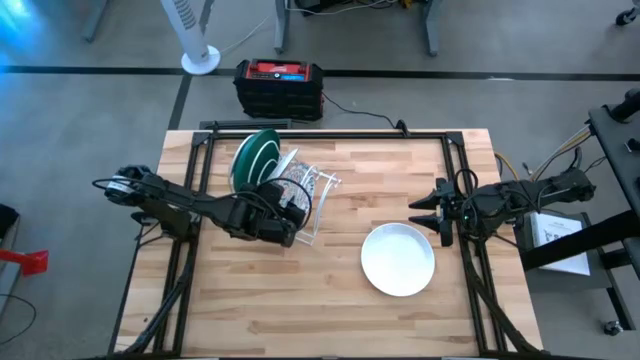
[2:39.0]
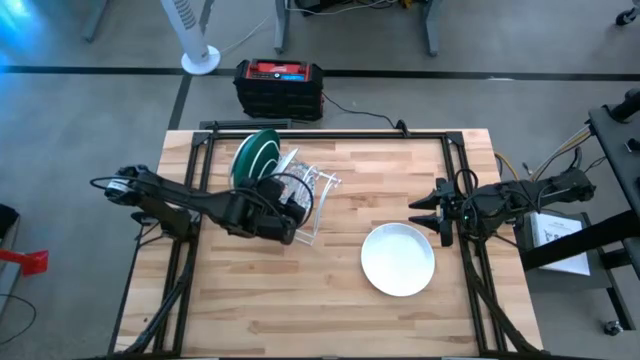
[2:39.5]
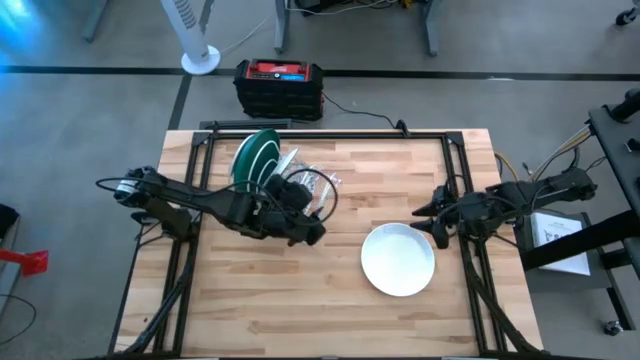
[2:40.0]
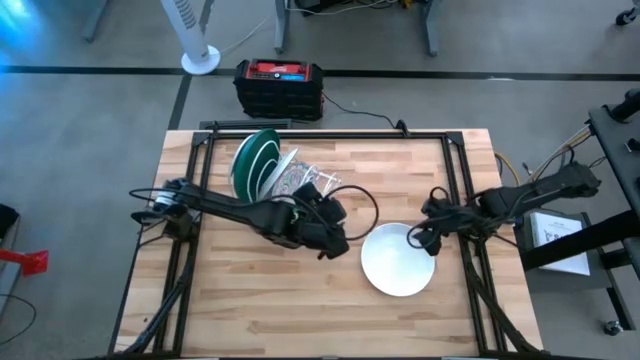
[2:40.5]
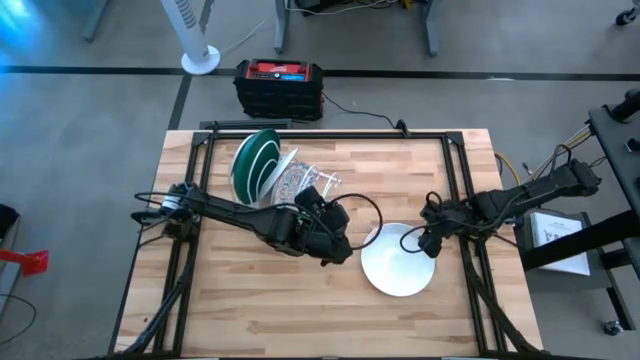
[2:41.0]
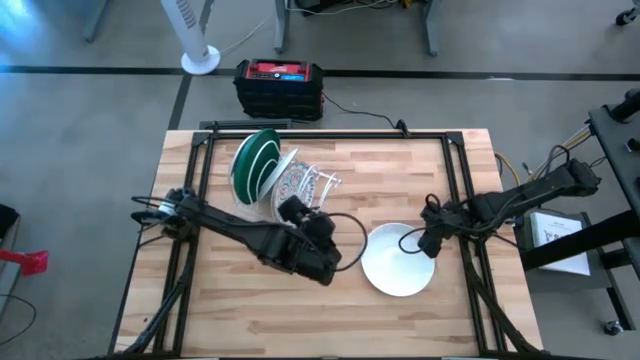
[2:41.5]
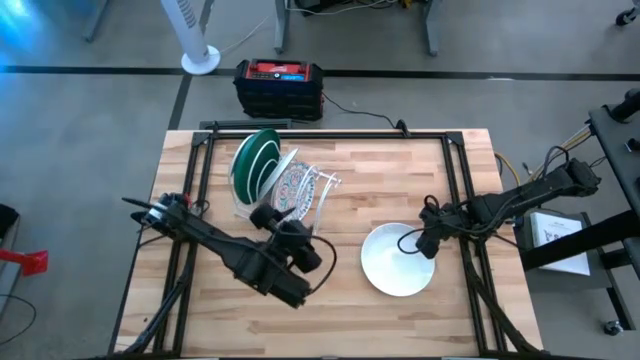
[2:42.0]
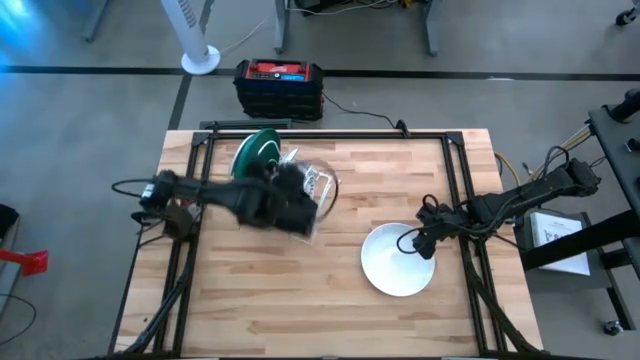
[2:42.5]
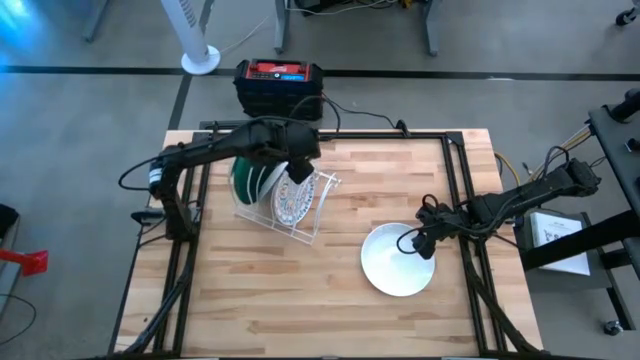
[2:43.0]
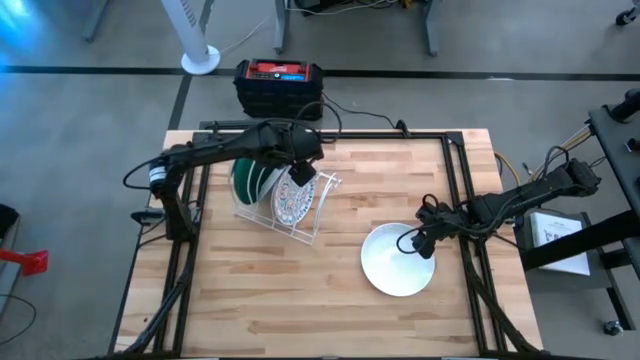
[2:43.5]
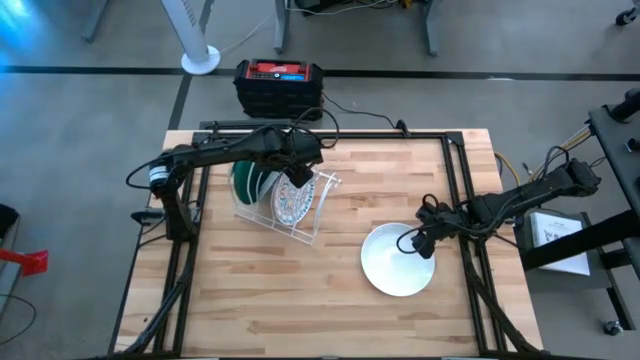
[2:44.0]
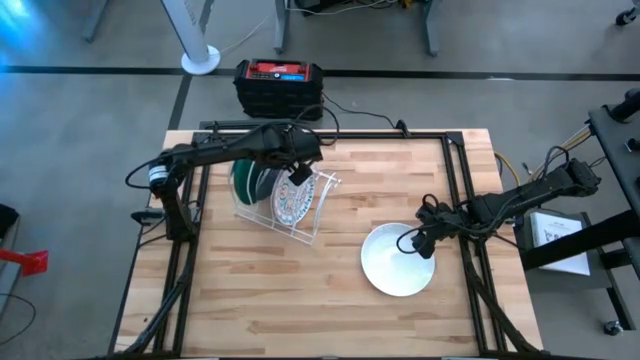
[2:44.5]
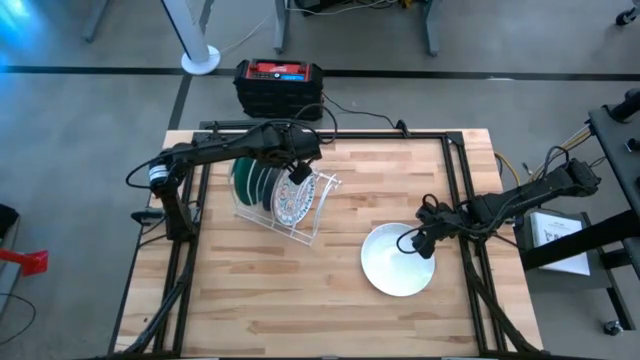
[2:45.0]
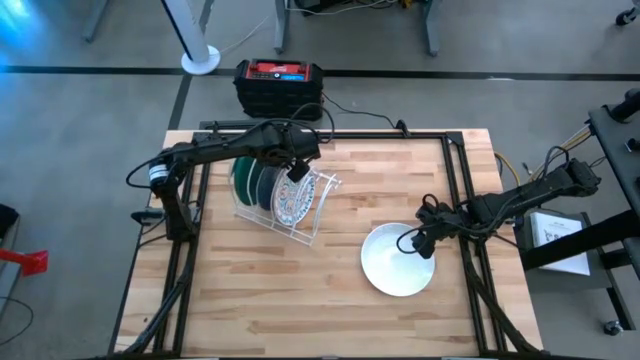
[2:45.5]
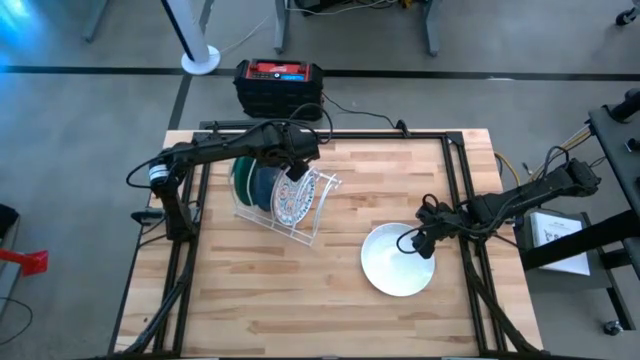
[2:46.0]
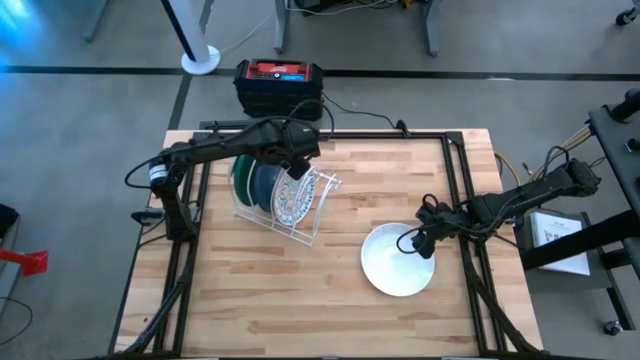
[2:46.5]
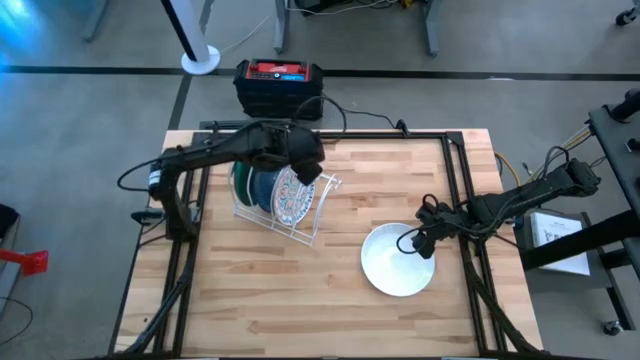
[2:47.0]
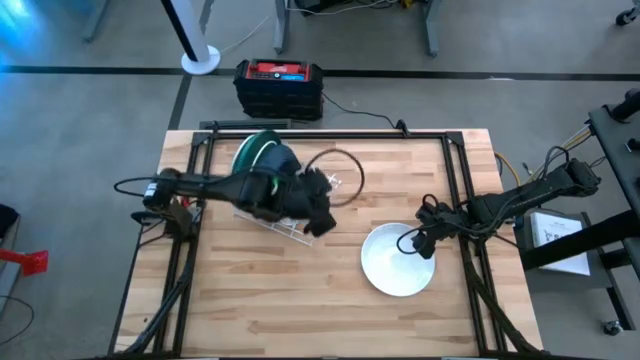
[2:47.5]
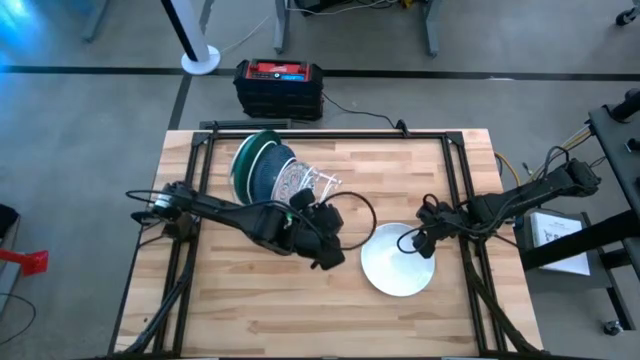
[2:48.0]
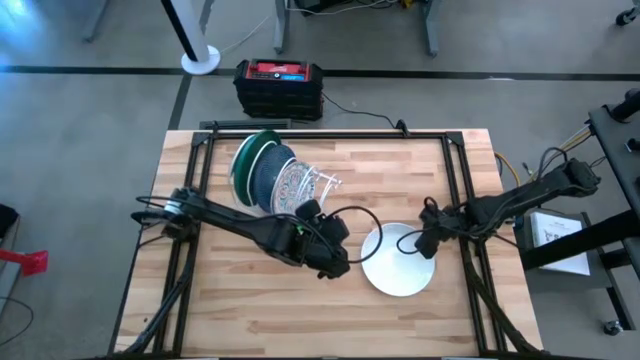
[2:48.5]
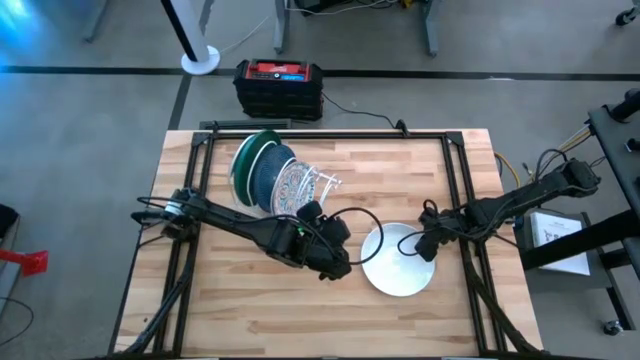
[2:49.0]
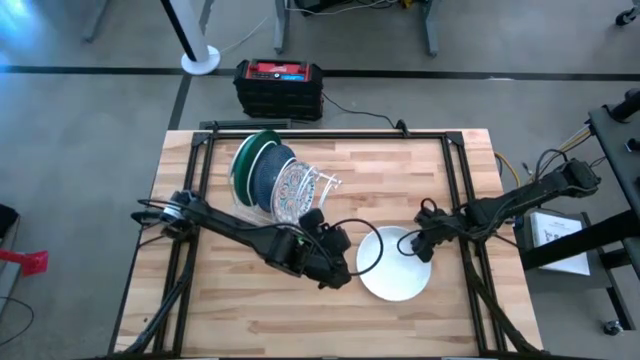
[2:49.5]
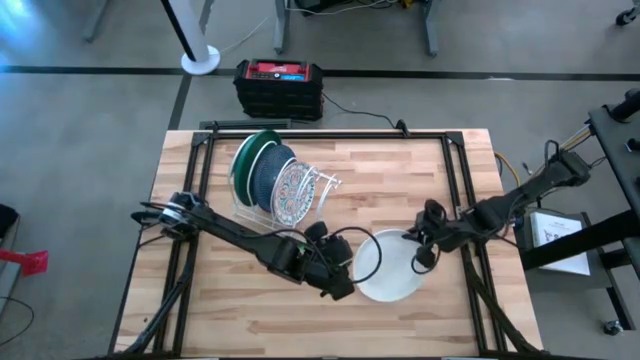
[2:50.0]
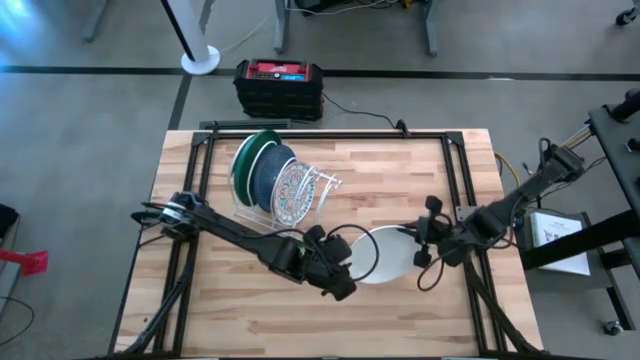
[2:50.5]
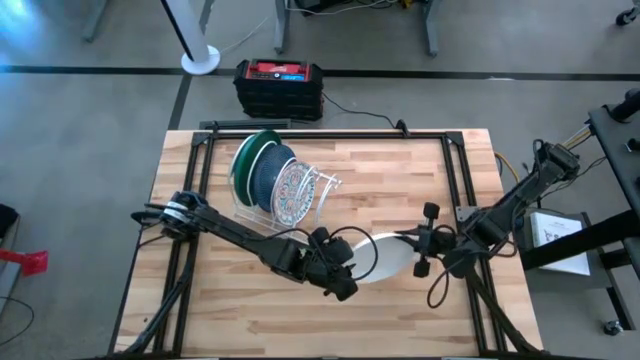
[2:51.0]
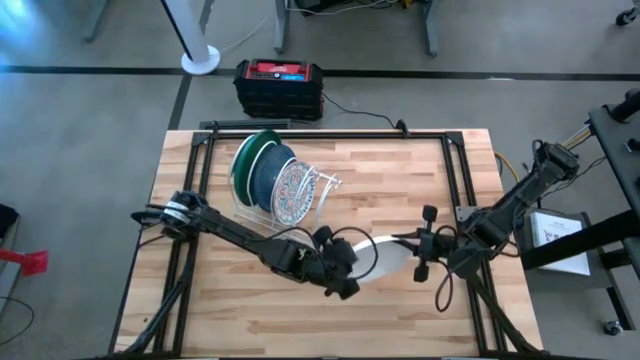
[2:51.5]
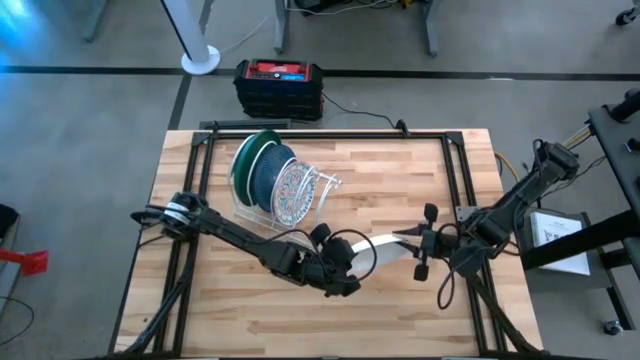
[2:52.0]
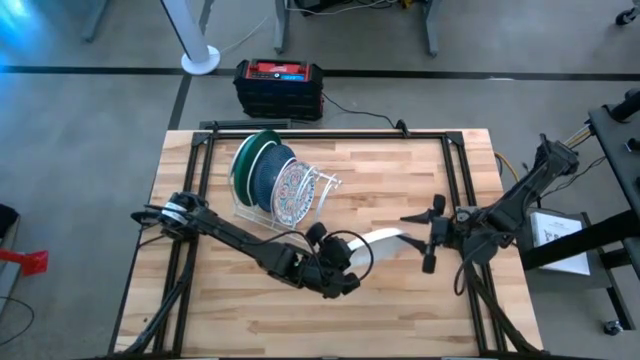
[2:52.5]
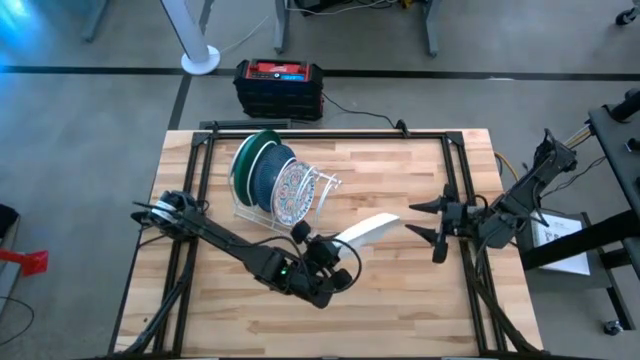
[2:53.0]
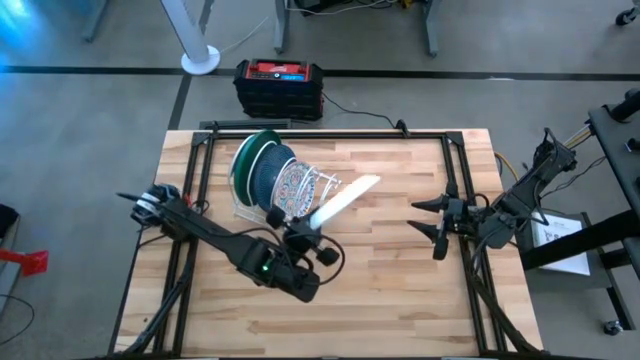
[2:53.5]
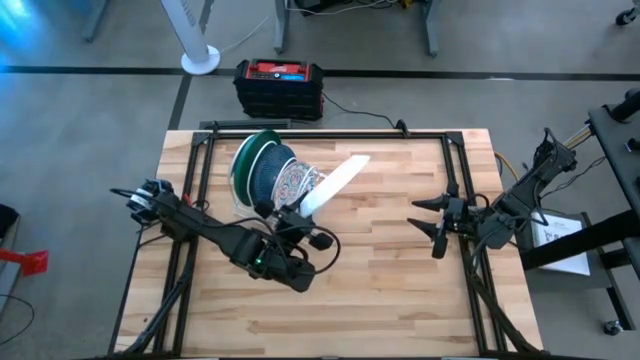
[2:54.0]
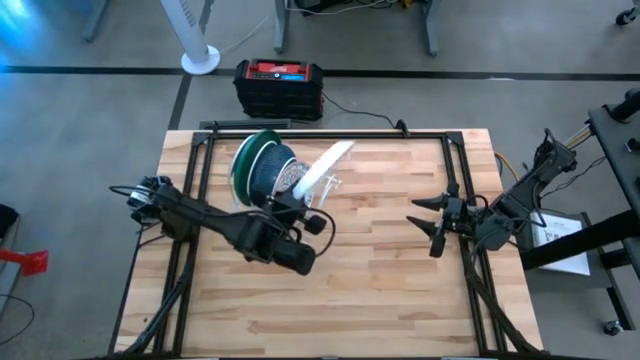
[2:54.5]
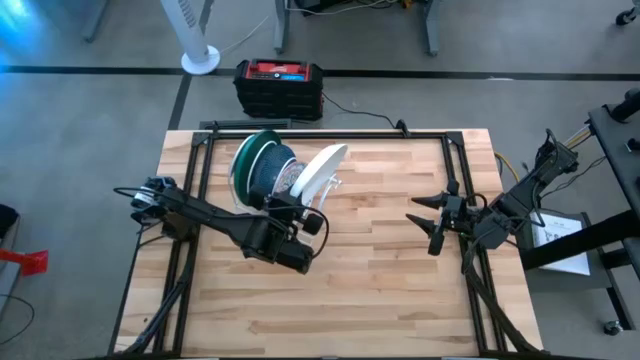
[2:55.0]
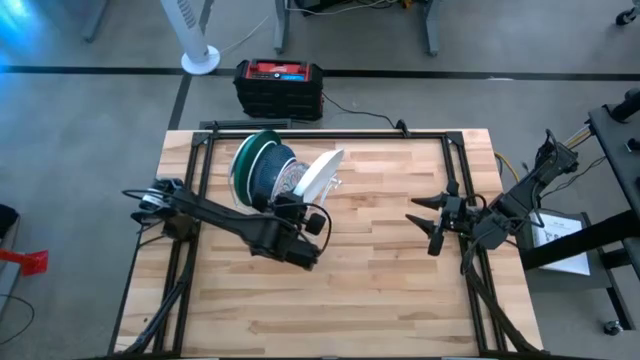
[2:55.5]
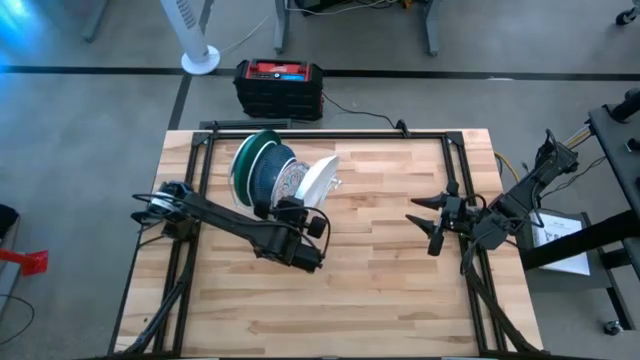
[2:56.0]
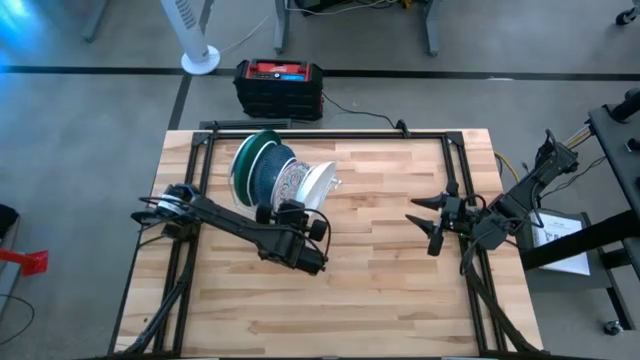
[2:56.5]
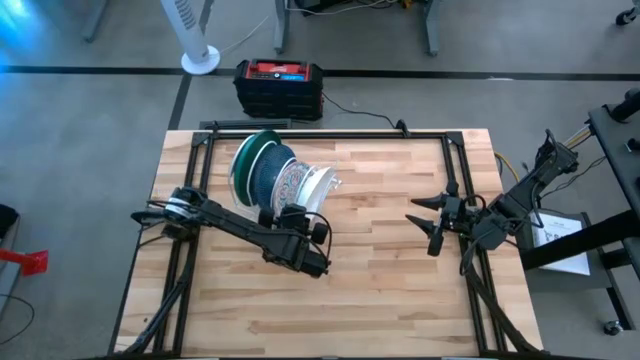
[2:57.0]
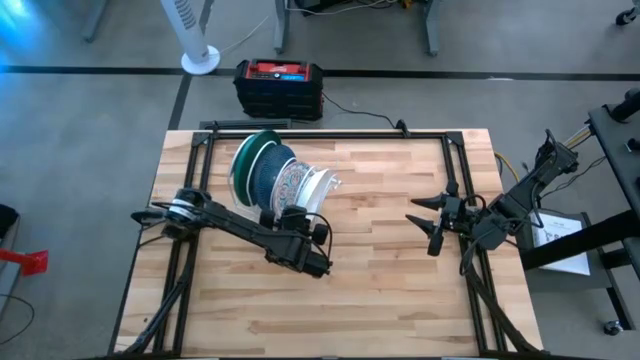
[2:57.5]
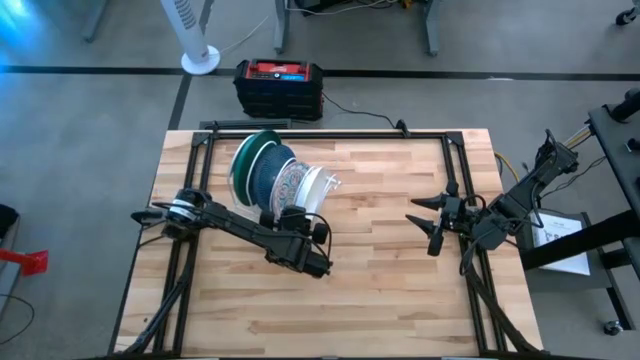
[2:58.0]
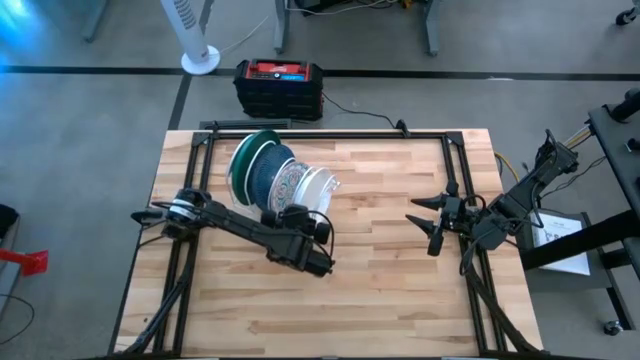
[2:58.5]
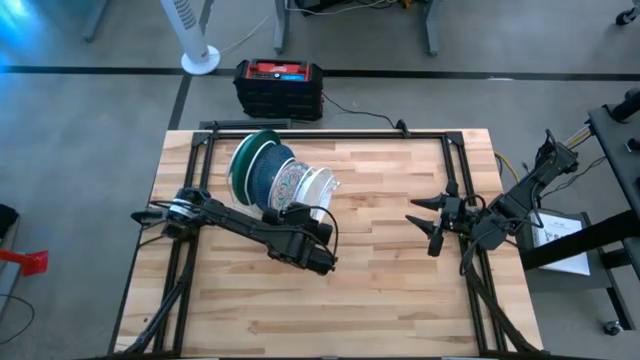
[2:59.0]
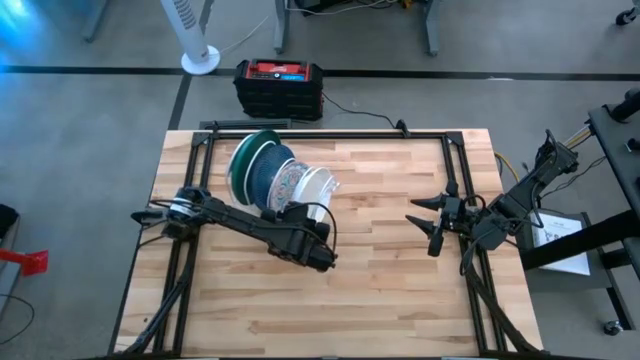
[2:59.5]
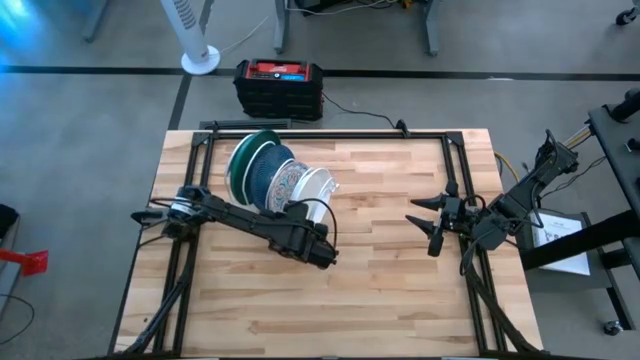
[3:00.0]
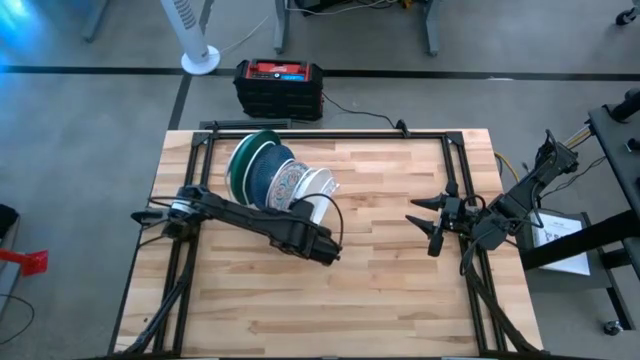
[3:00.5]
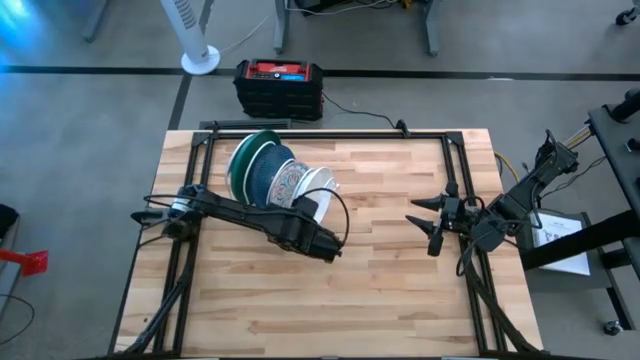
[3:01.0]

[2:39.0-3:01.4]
Task: Sort dishes
Put the white plate in the dish rack
